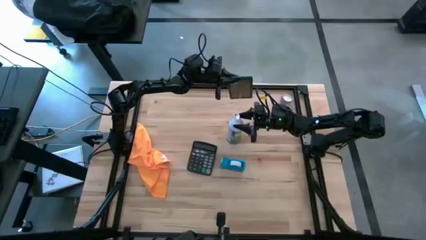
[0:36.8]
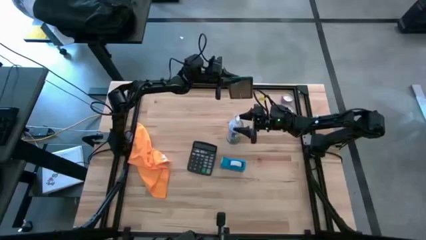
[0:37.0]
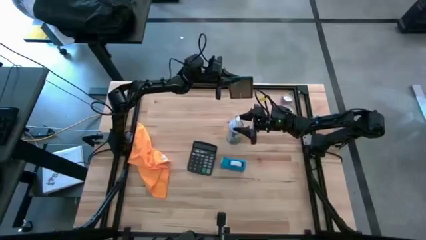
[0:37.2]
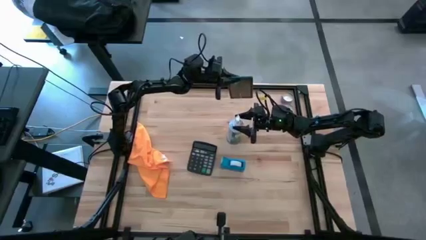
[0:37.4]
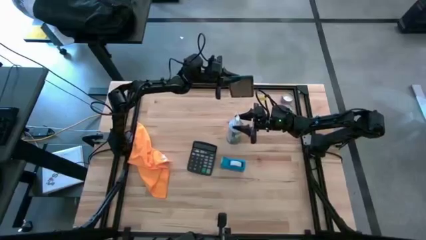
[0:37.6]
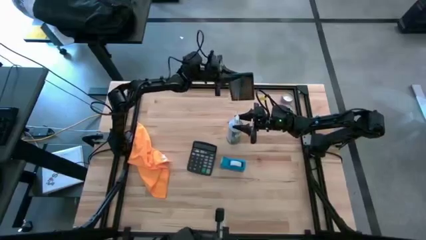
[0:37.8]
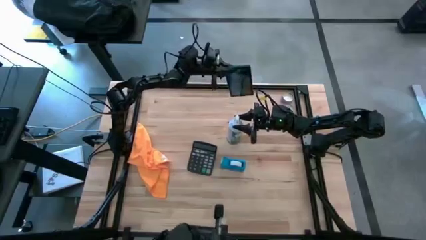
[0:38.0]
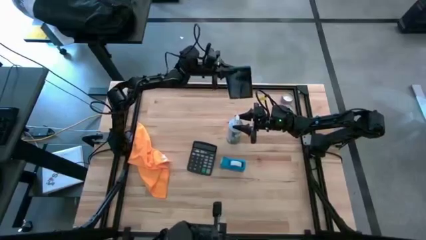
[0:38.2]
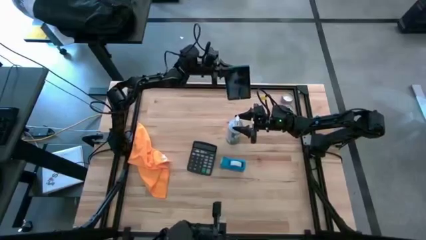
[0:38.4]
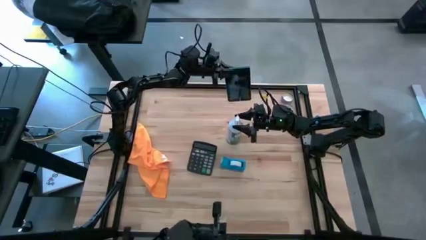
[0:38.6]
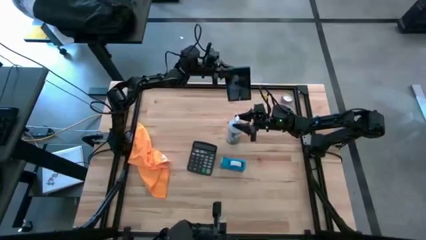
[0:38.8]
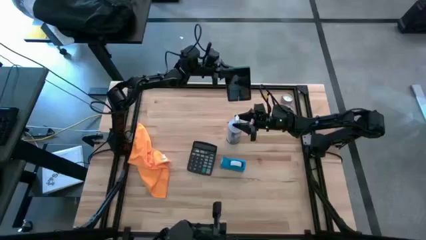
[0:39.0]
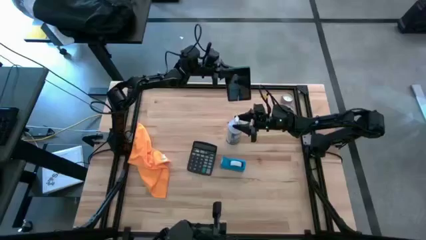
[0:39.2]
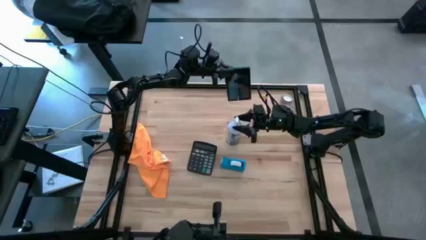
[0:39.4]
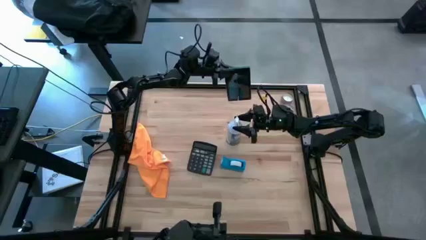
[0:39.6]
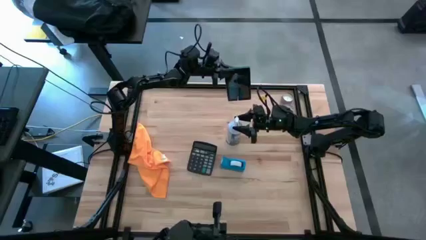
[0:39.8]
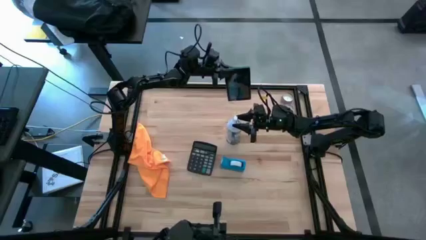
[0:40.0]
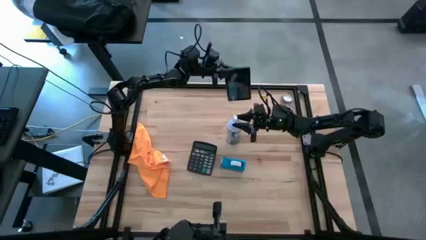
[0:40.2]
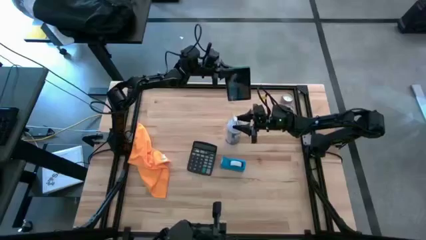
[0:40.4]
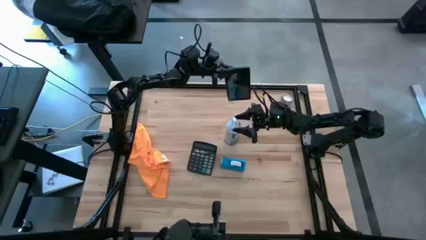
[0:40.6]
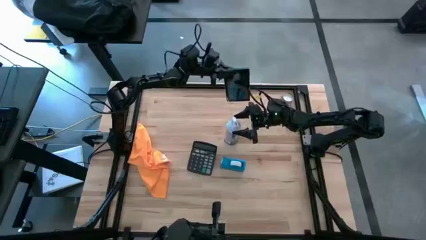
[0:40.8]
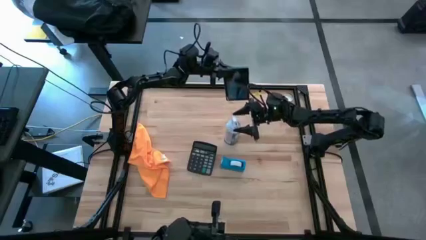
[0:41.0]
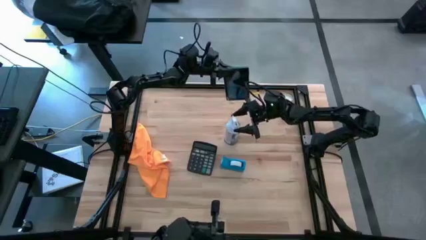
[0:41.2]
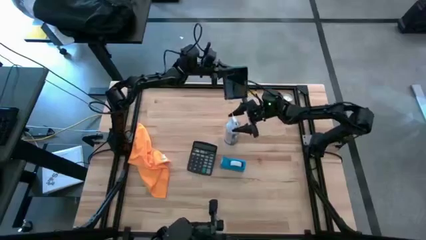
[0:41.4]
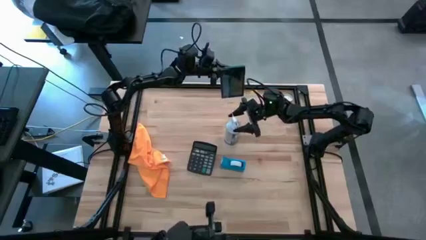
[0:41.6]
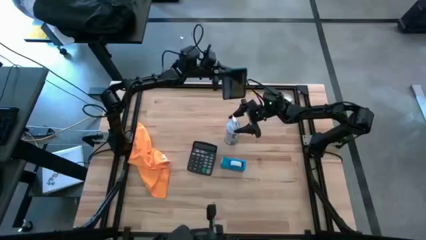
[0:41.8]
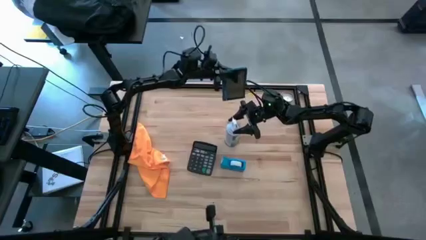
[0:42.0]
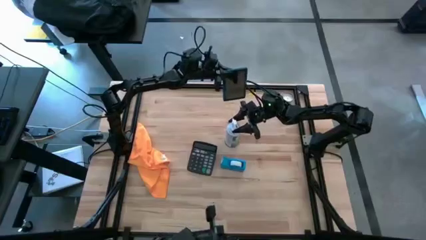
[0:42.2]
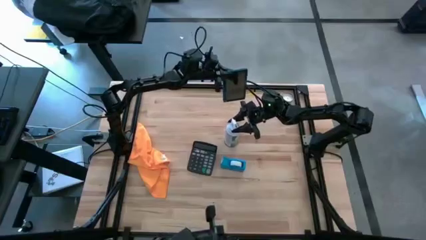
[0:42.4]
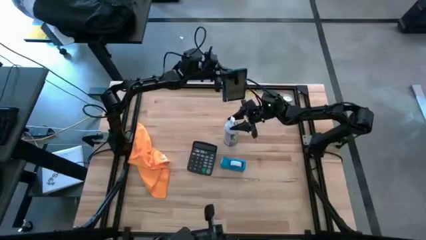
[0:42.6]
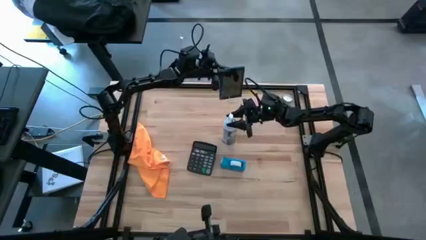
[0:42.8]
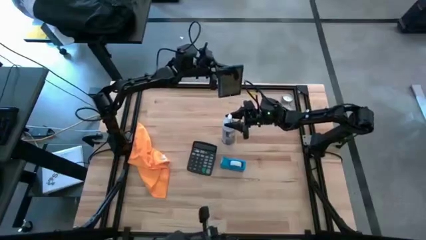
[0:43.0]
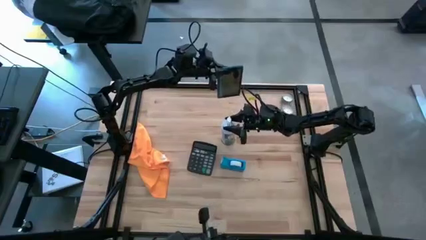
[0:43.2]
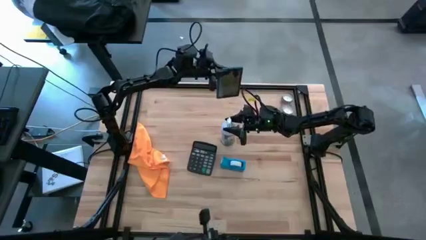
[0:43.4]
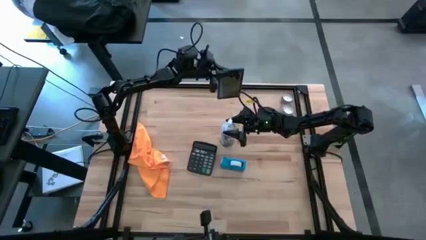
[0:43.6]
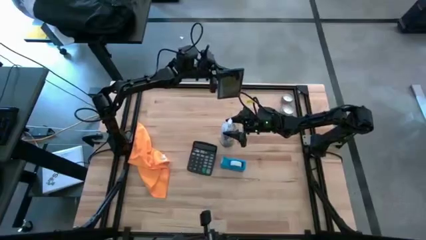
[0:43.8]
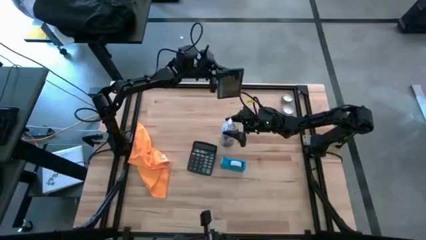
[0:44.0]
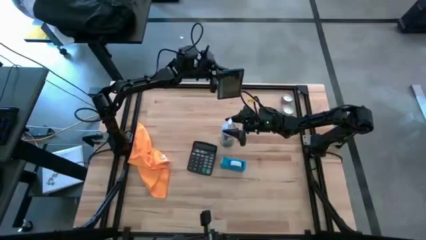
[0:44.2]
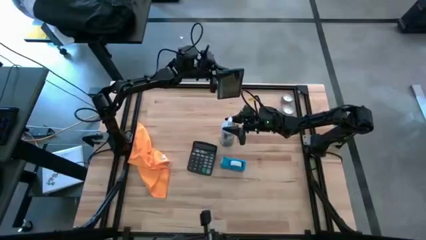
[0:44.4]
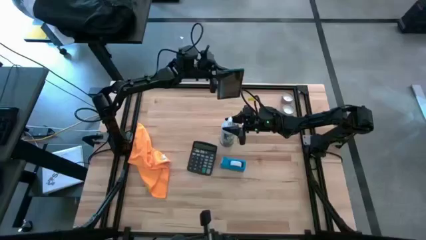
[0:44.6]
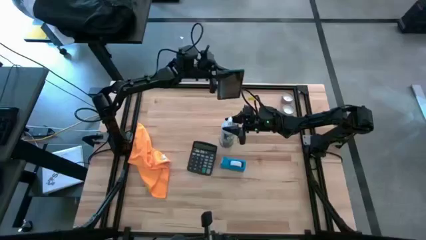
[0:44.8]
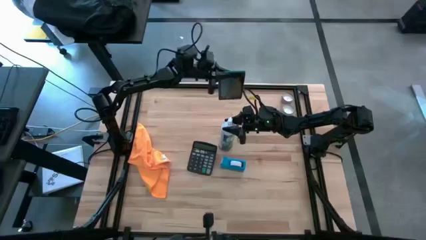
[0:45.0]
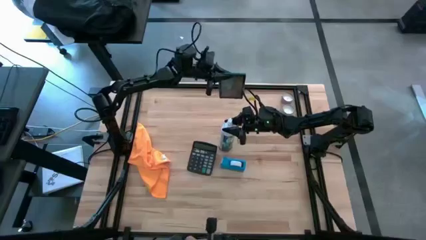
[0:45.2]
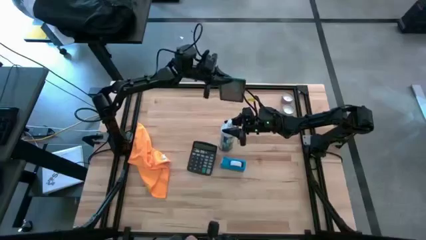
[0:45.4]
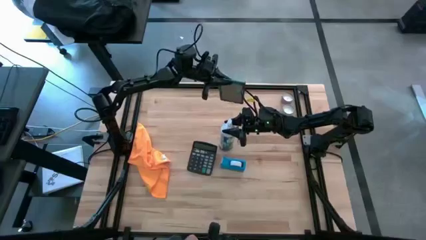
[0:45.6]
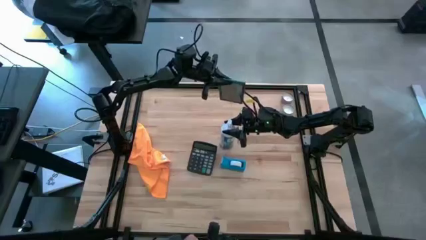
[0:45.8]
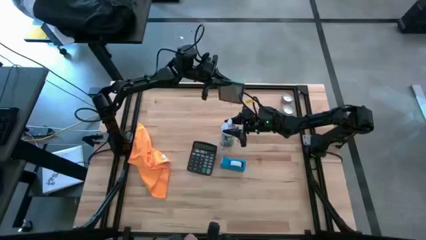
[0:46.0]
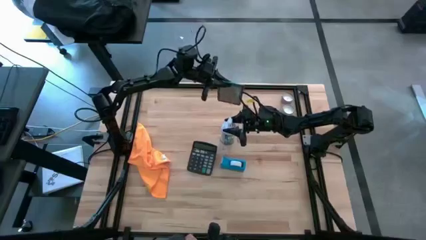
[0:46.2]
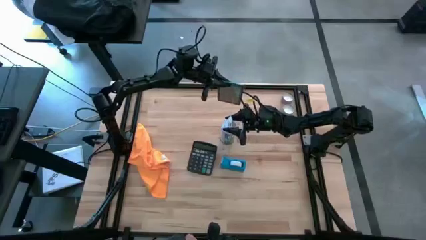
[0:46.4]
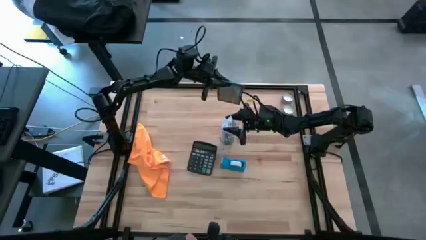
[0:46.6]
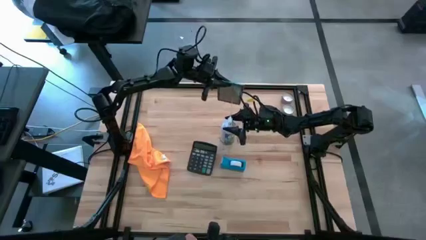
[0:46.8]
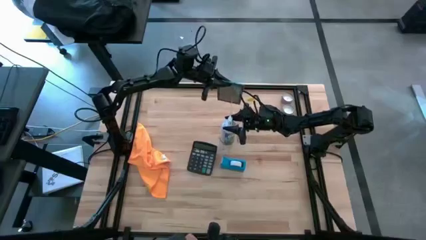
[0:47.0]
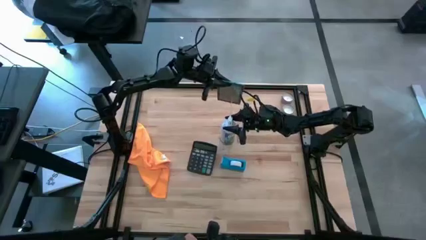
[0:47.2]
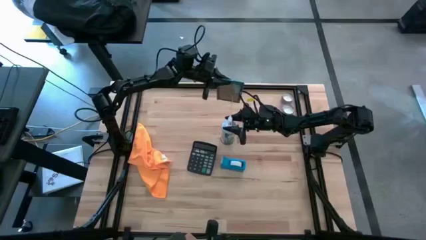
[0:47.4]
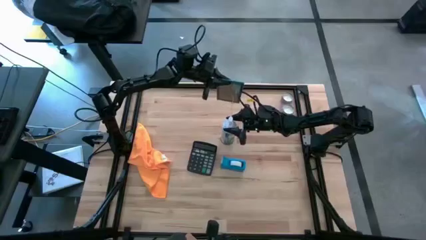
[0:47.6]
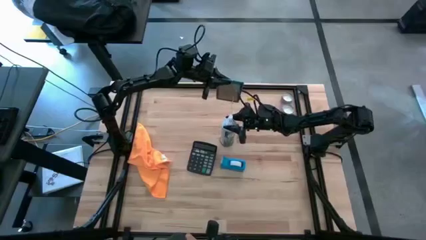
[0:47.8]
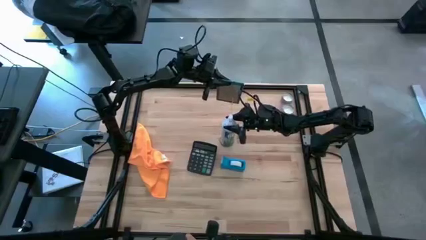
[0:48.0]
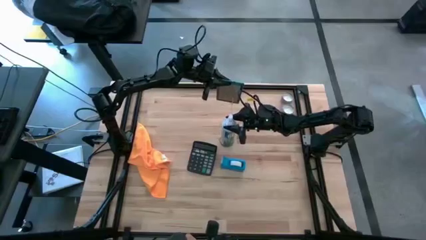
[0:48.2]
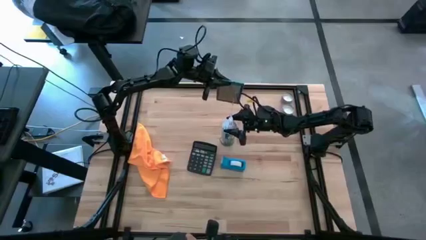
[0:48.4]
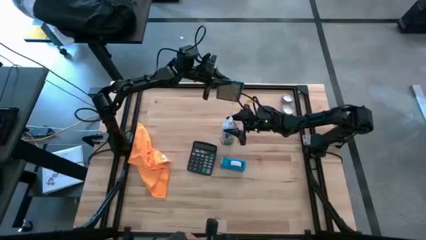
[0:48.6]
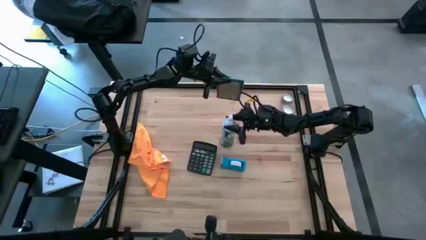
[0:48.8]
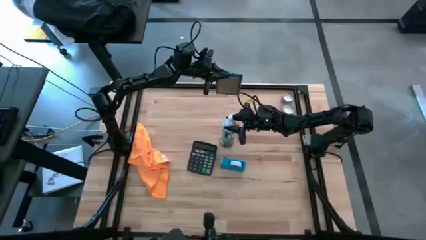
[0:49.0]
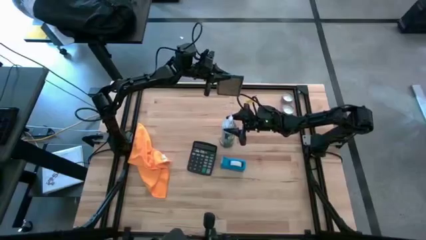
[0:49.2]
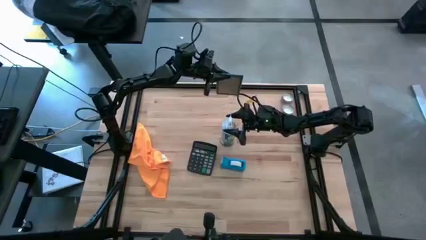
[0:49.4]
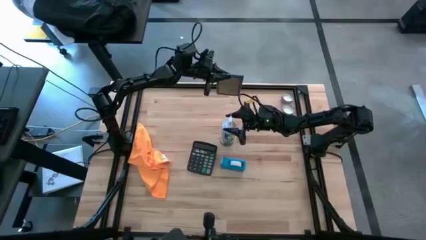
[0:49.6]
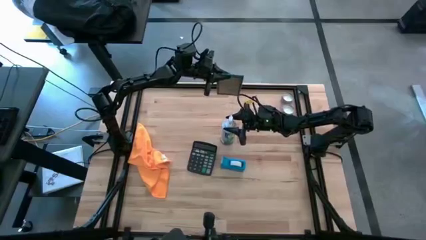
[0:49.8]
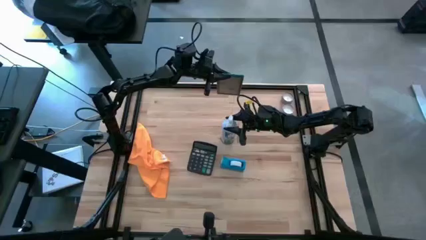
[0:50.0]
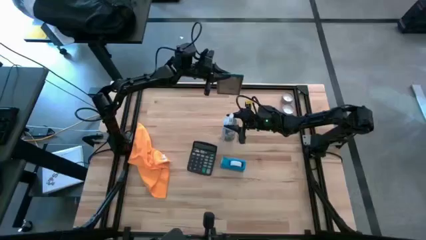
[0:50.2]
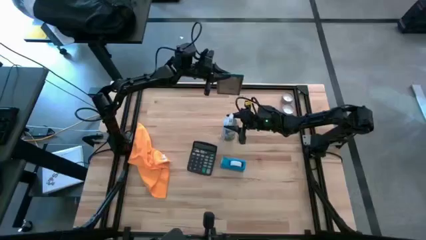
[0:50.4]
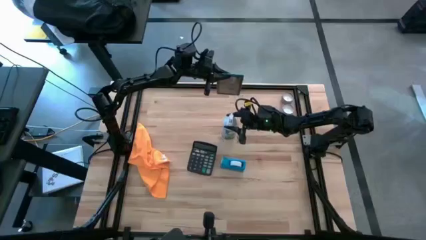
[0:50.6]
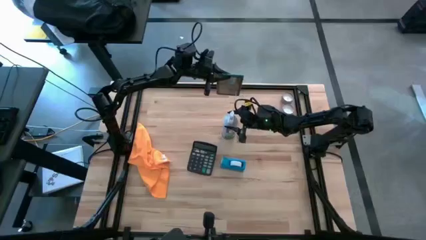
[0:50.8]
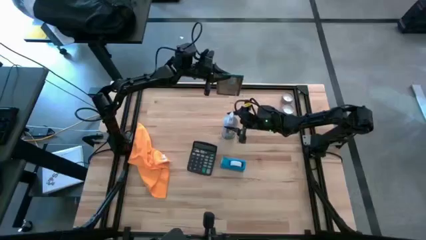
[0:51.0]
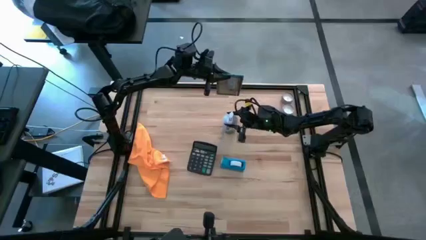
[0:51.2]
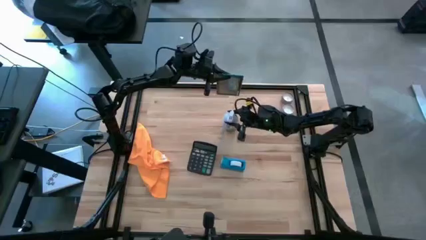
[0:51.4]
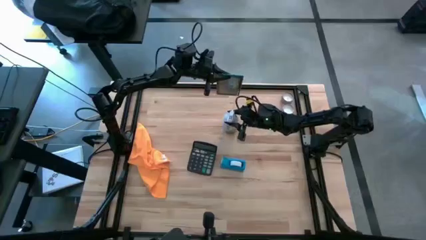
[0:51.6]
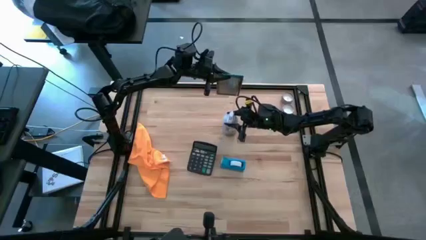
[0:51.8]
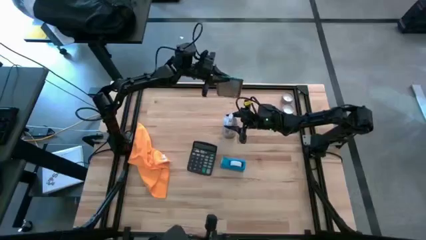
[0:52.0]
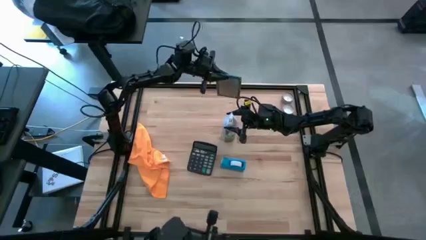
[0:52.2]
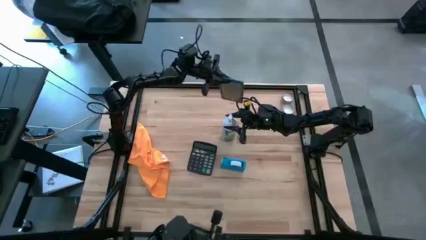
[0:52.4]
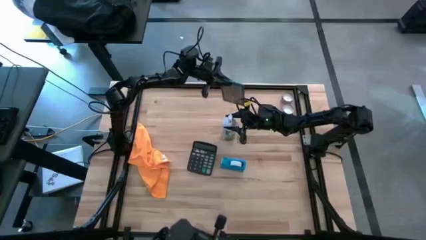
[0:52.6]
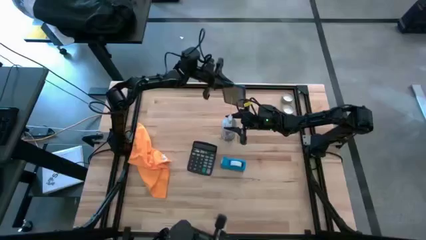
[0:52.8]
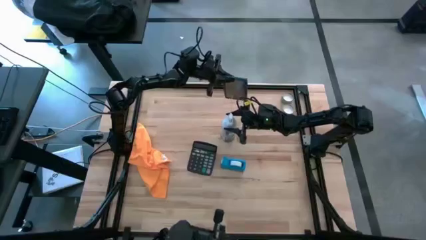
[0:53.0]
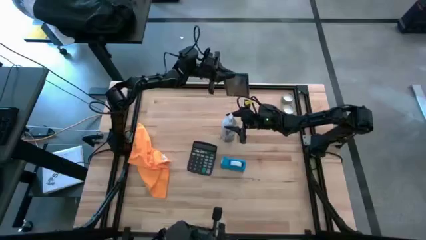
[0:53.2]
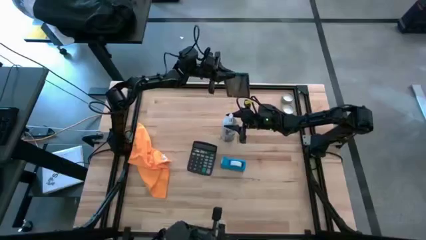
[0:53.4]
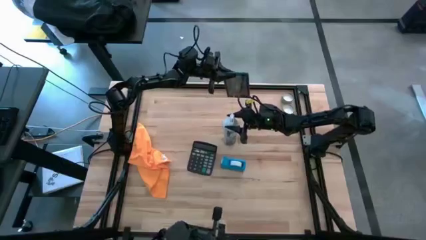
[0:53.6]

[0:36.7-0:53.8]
Task: Apply microfiber cloth
Spray the front of the cellphone with spray bottle
